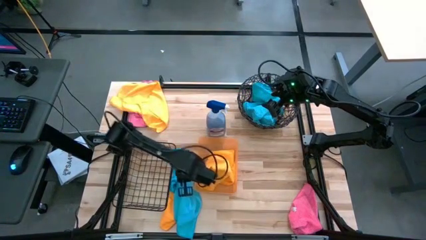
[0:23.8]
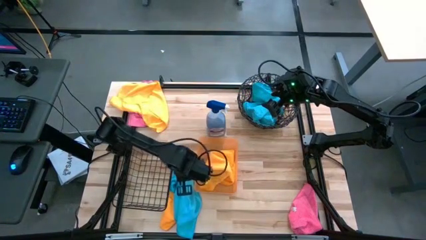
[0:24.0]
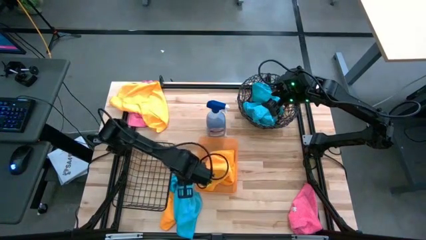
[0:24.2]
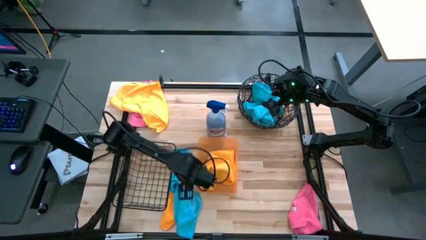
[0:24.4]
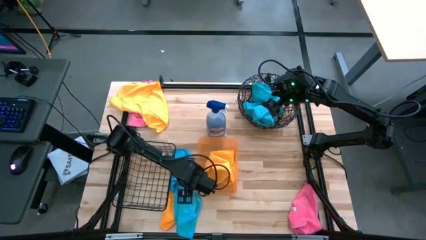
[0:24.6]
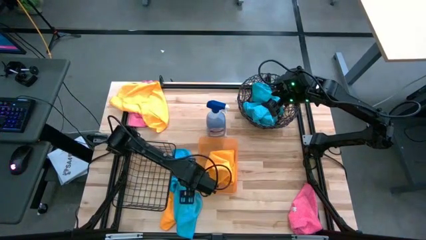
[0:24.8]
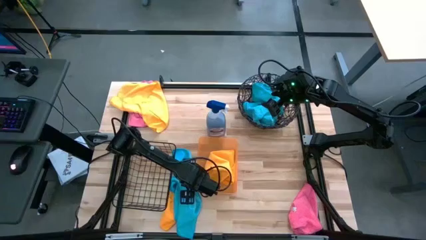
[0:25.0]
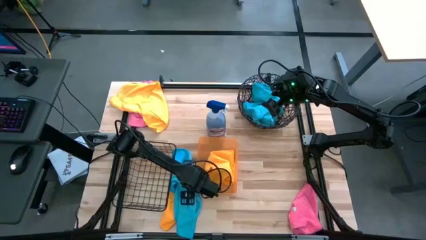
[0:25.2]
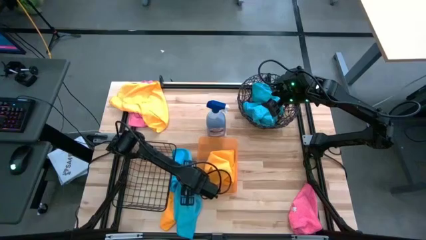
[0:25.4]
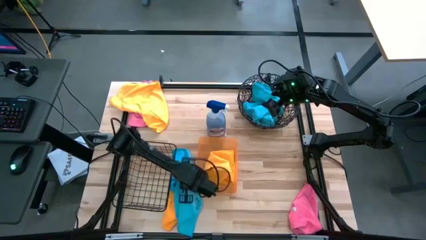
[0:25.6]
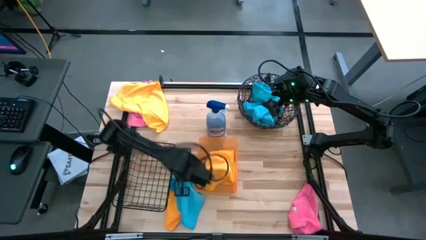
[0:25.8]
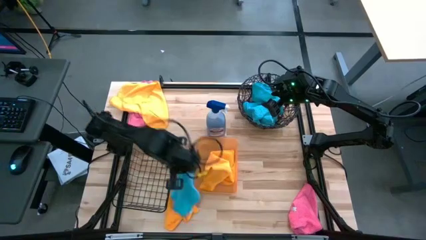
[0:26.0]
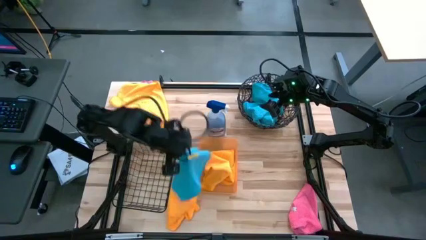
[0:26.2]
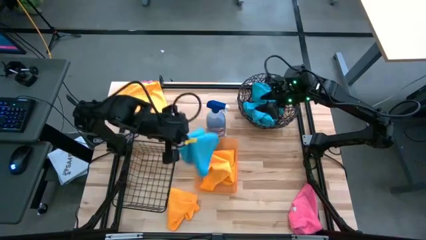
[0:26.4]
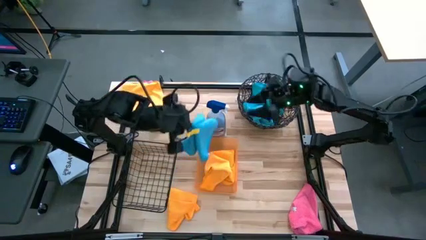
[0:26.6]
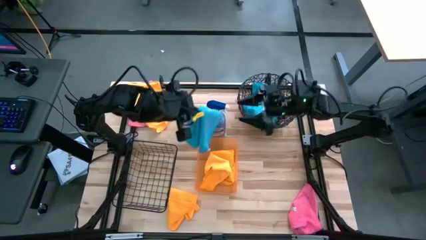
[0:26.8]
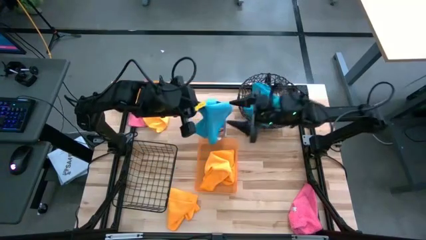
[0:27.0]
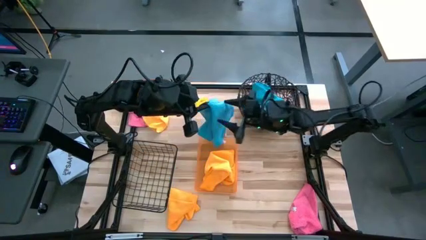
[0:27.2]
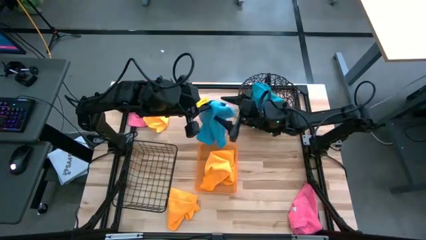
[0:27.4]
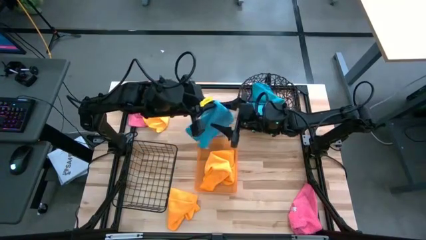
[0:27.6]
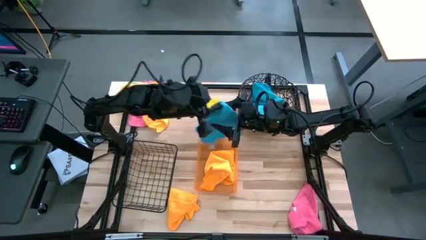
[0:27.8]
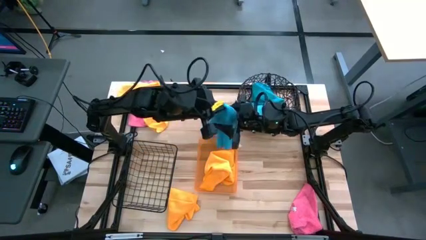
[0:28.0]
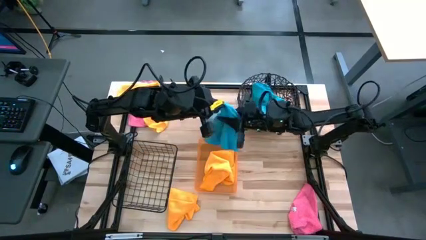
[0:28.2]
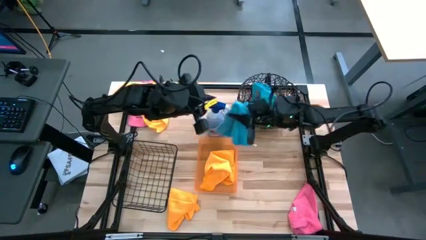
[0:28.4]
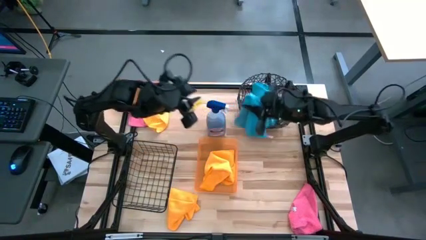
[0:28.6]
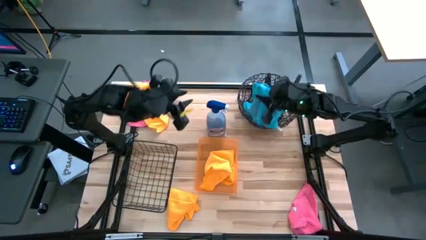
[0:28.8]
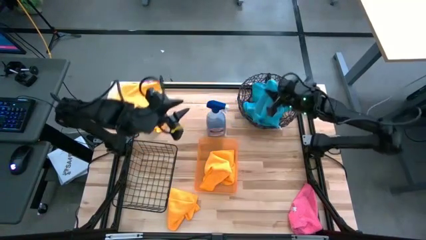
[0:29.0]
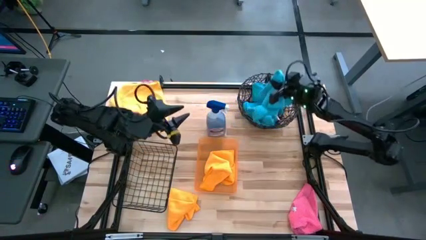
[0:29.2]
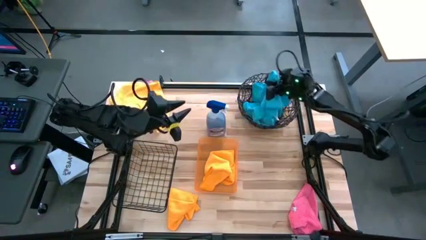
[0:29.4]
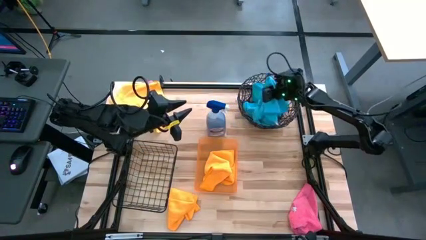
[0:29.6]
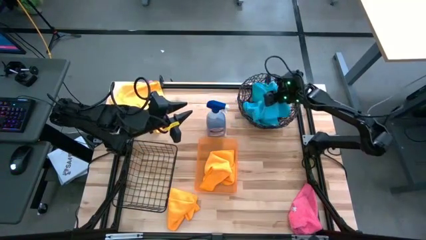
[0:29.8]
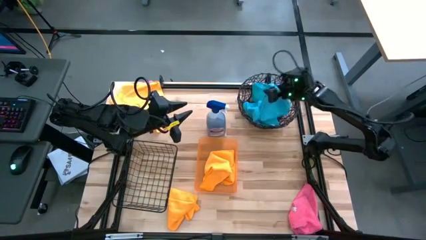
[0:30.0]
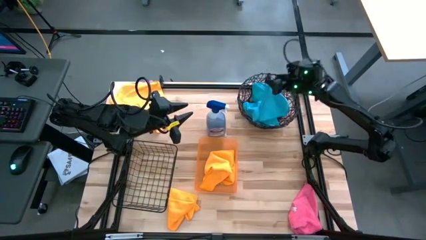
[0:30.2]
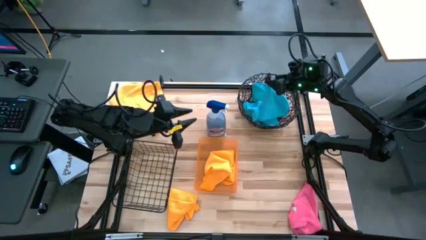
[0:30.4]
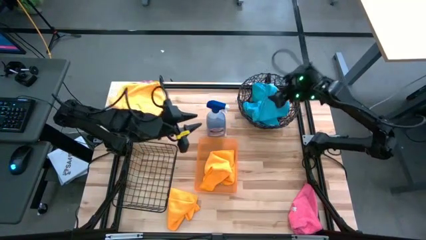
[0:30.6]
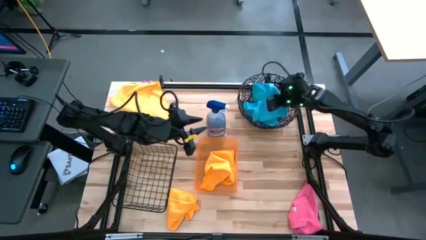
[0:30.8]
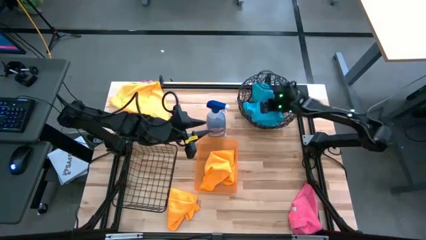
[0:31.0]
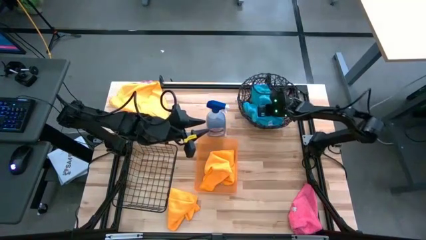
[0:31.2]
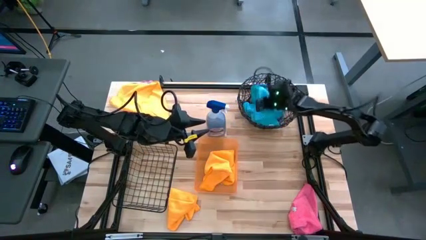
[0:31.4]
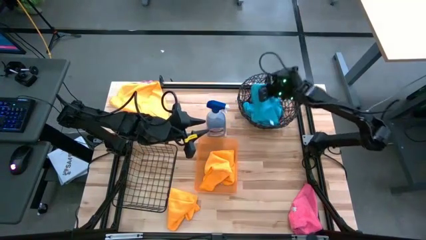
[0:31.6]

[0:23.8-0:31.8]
Task: Sort microfiber towel by color & place in baskets
Put the blue towel into the brown woven basket

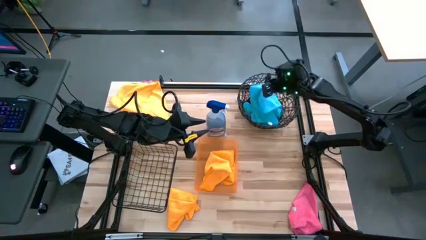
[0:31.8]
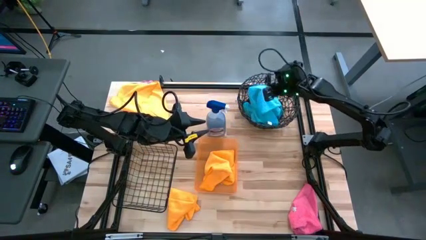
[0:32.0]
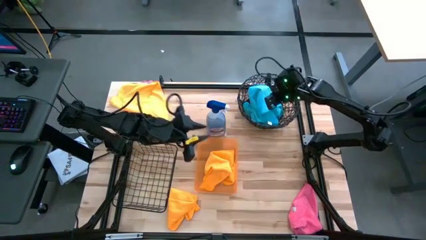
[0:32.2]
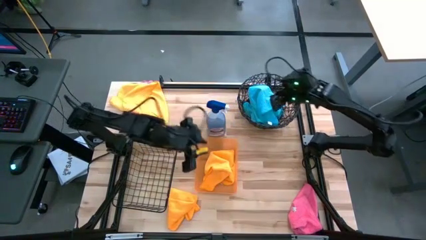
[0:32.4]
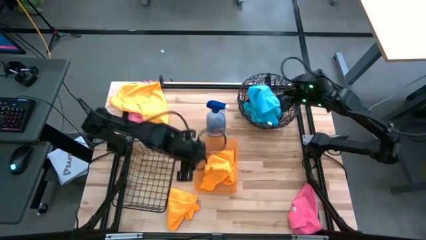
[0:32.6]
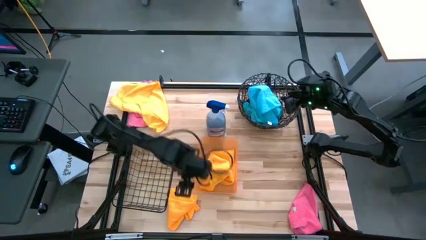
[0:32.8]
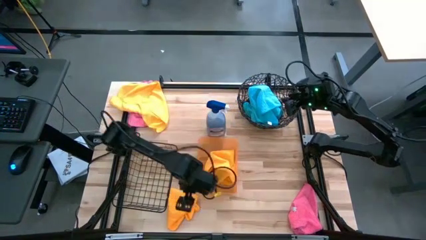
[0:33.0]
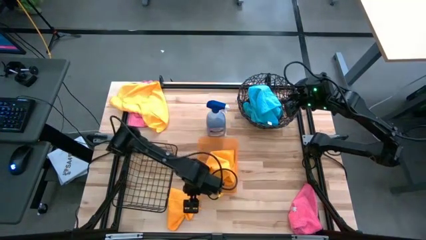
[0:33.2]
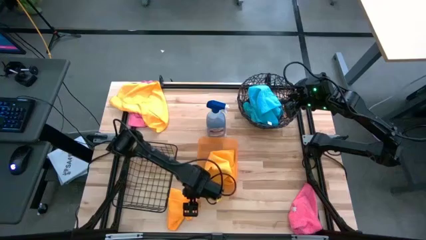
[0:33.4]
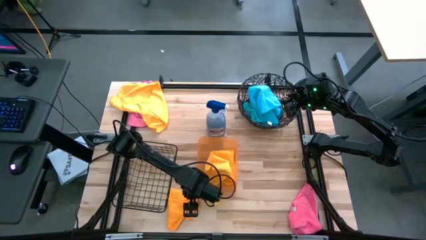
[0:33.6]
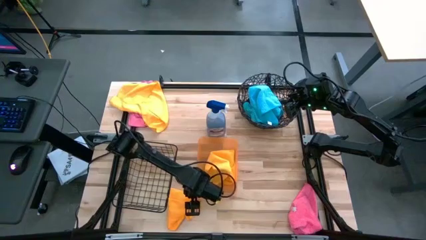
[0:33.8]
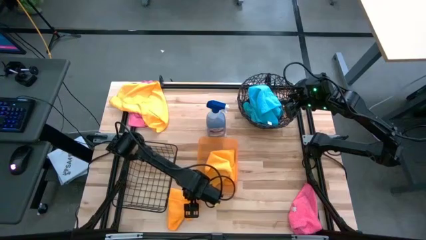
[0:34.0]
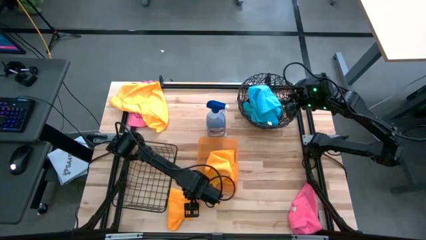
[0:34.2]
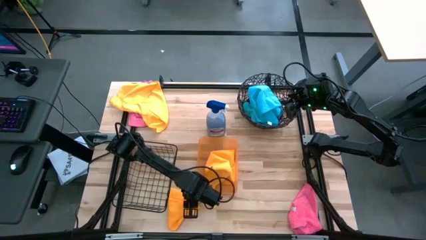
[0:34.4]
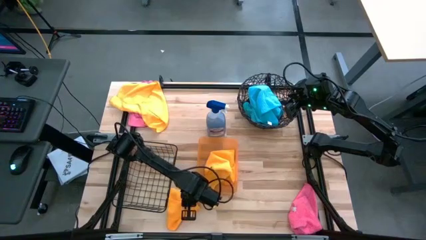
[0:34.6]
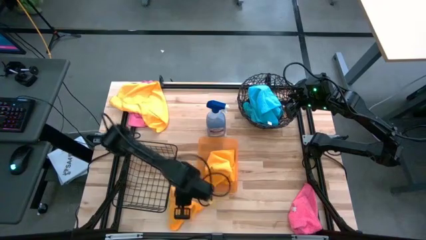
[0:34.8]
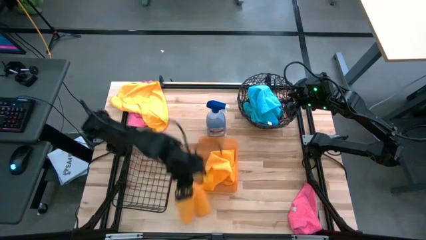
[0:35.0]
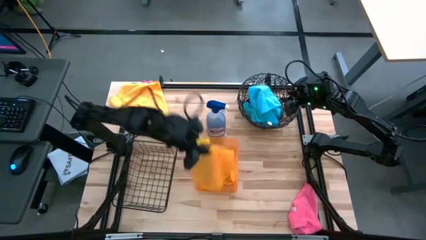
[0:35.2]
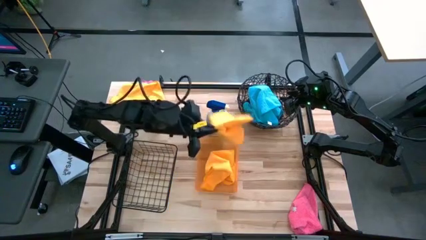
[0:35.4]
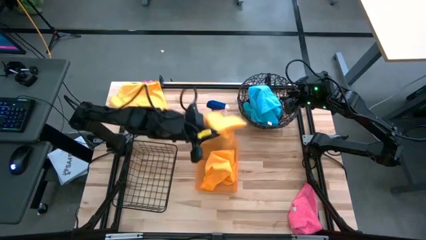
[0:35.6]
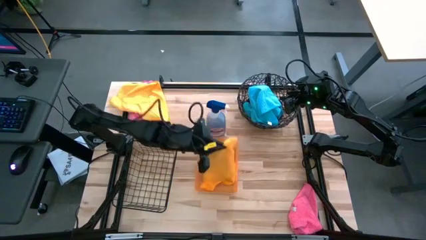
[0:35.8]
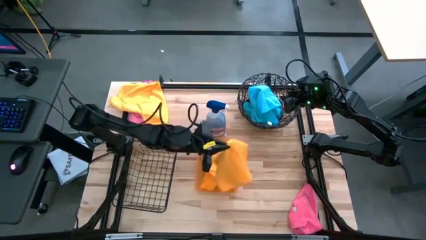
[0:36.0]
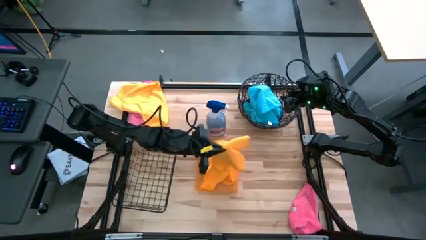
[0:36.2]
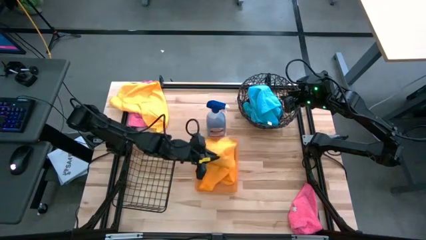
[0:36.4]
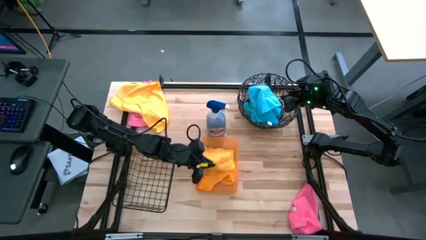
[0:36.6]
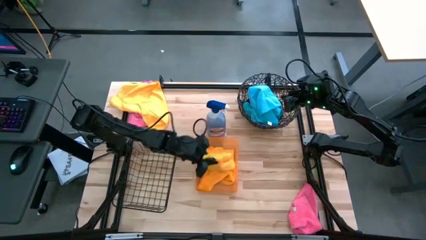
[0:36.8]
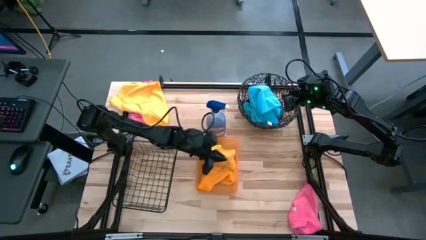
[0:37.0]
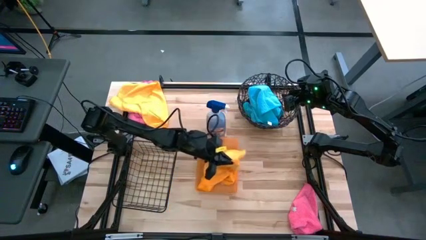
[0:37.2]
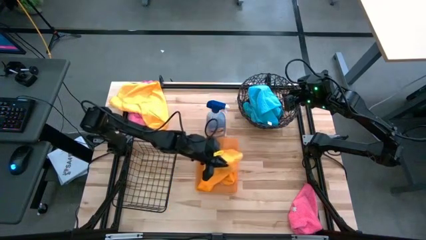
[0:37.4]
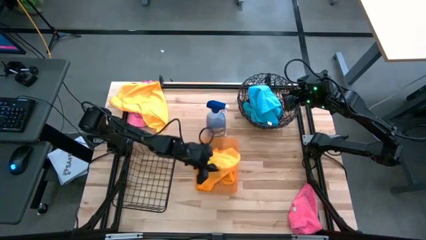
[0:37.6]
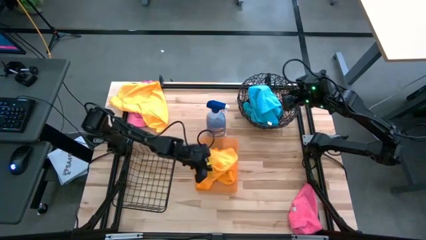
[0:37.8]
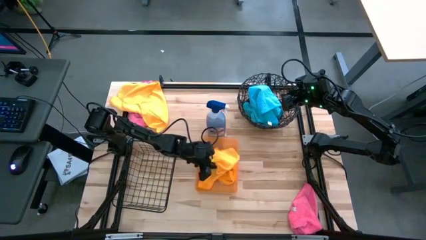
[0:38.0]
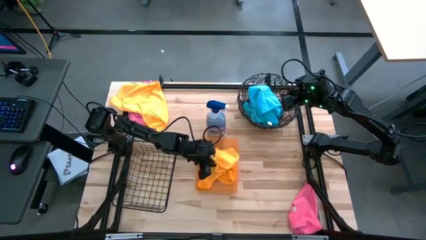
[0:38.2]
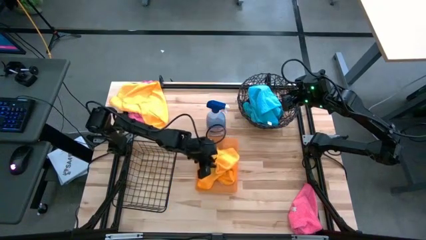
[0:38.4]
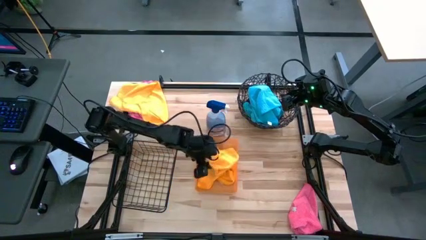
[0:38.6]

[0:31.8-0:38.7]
Put the bottom yellow towel into the orange bin

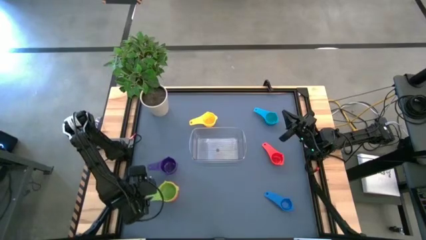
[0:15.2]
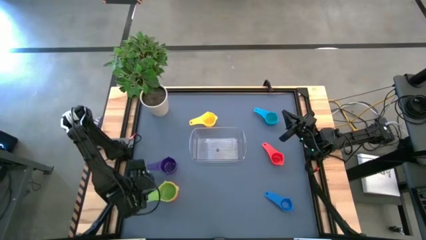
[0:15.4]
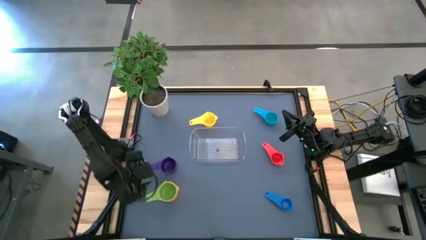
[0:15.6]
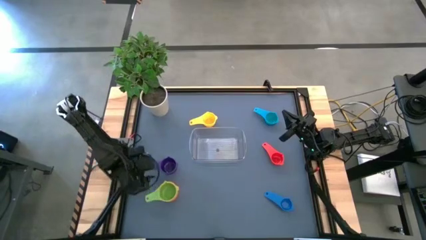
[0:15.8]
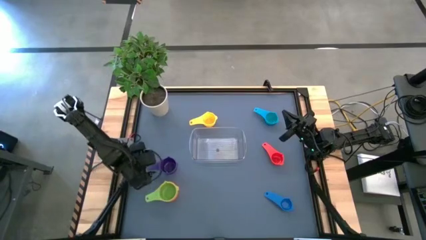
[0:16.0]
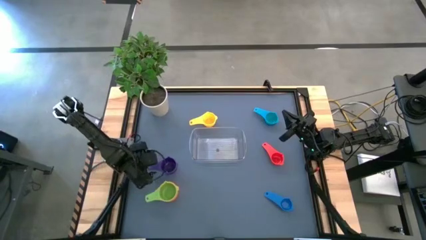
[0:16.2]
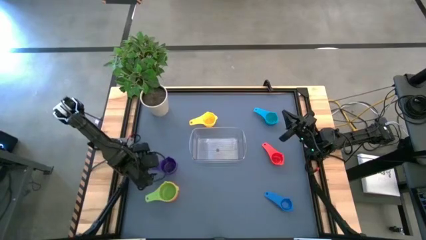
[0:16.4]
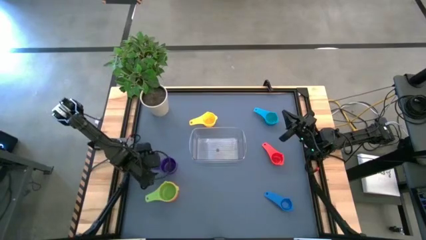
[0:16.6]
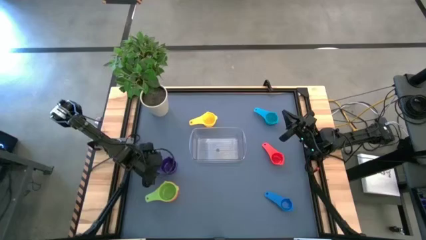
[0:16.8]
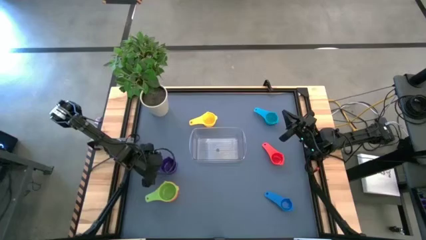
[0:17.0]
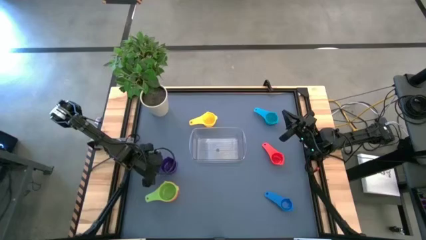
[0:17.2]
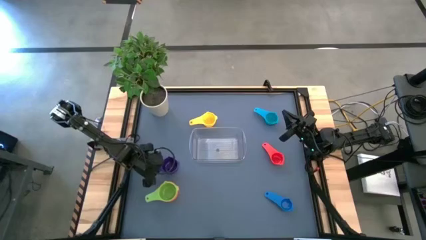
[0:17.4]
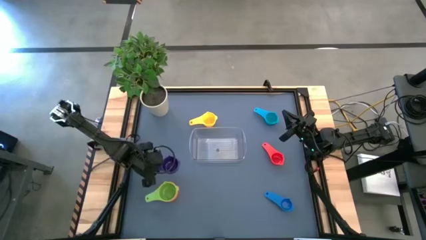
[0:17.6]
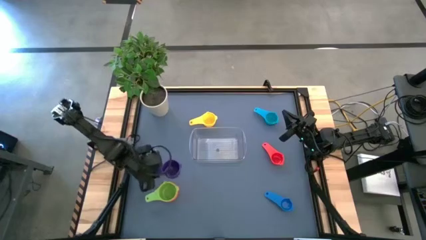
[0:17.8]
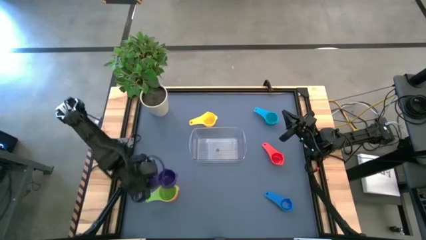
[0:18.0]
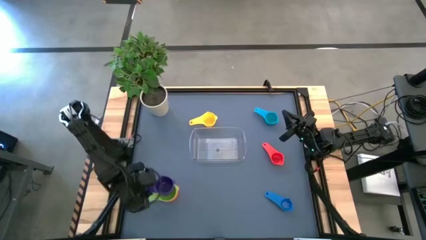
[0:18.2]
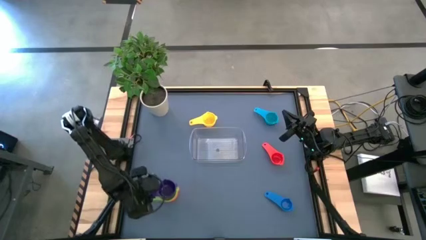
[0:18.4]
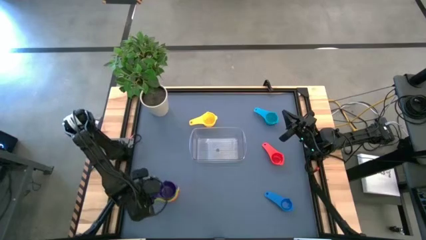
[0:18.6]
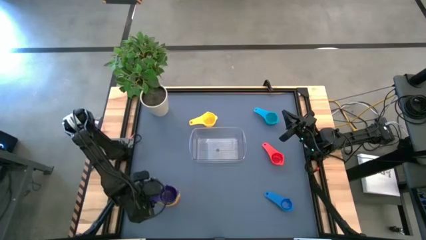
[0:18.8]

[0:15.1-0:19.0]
Task: Nest measuring cups in basket
Stack the violet measuring cup on top of the green measuring cup
